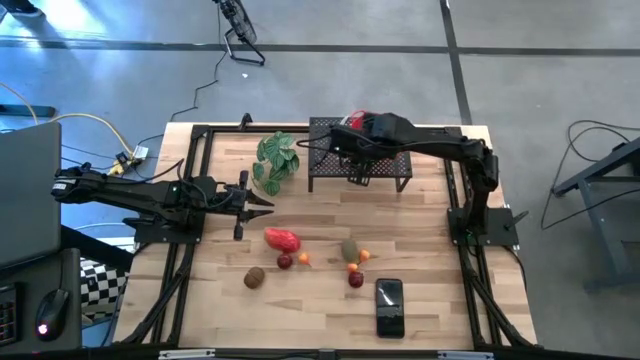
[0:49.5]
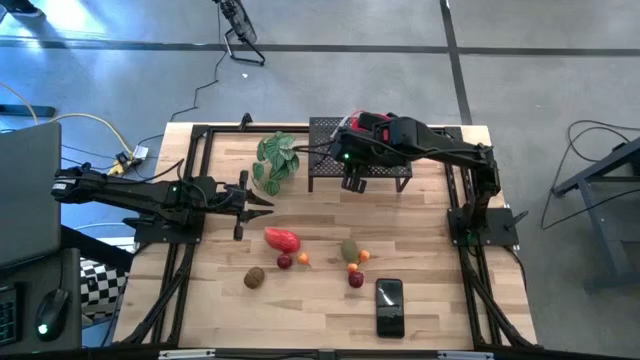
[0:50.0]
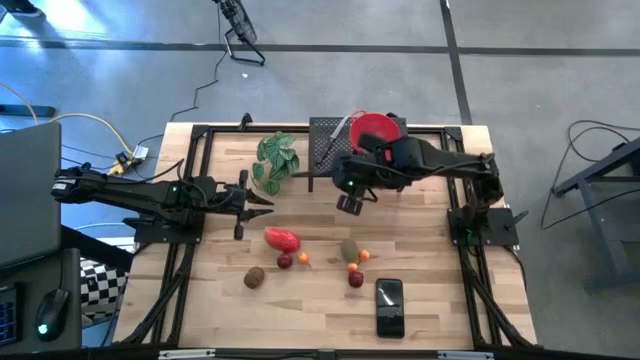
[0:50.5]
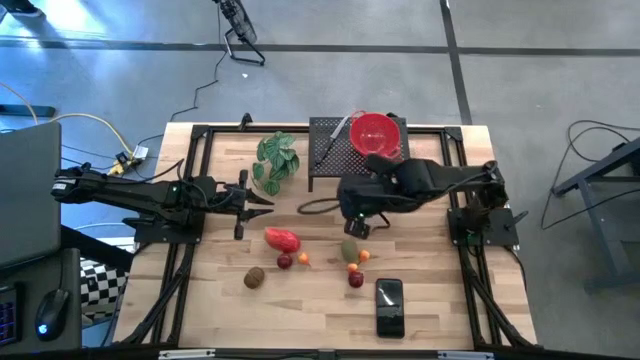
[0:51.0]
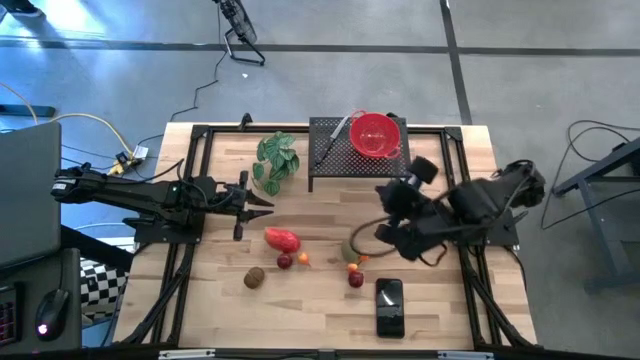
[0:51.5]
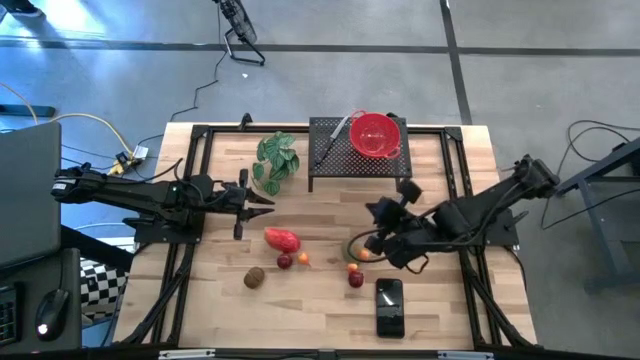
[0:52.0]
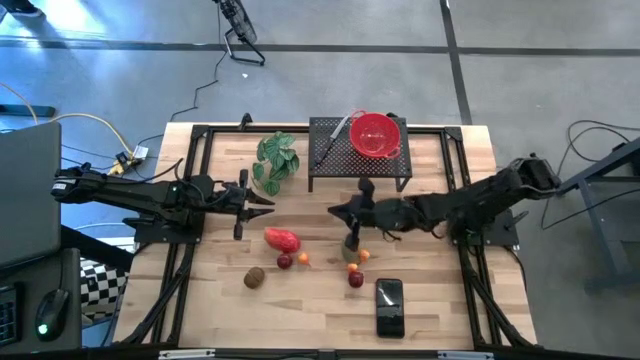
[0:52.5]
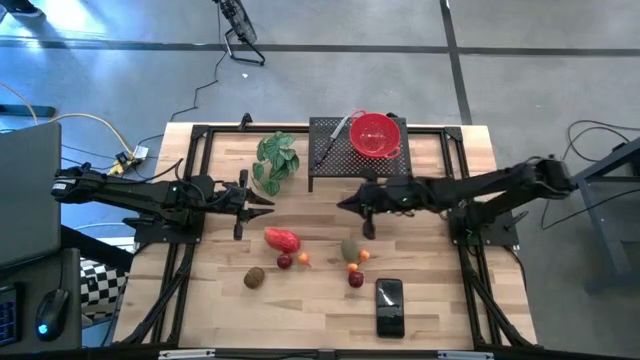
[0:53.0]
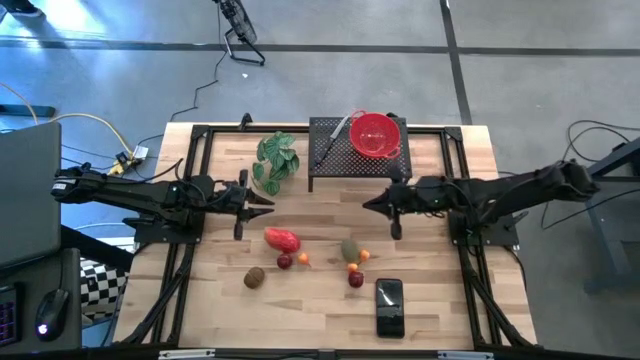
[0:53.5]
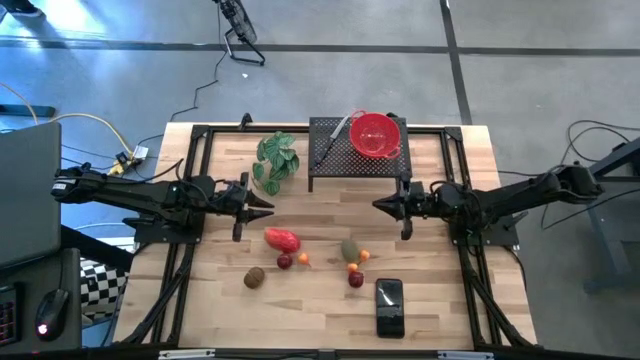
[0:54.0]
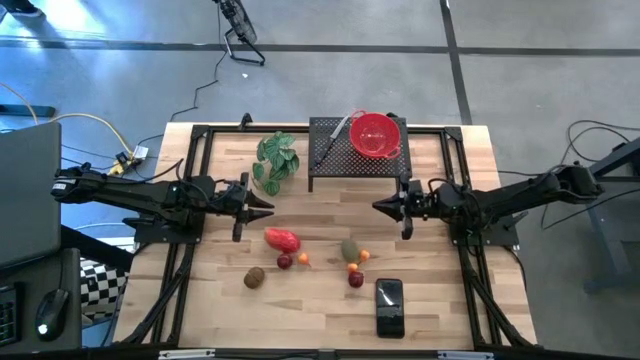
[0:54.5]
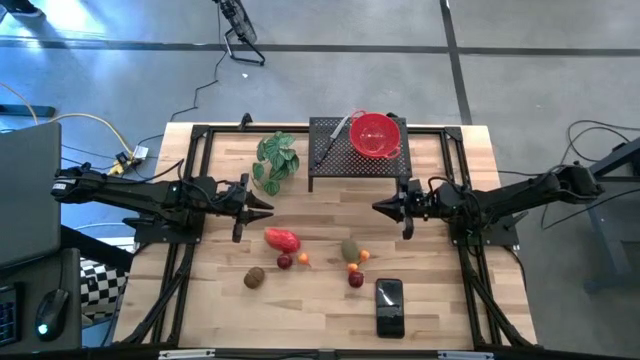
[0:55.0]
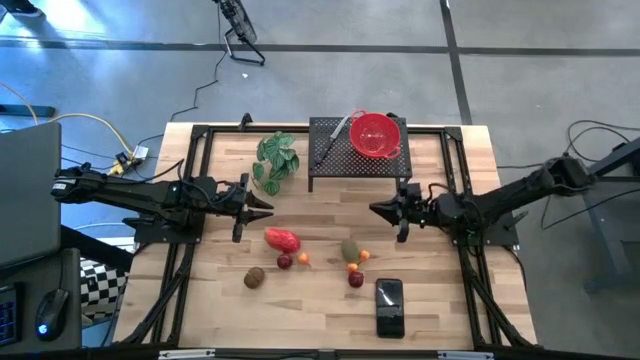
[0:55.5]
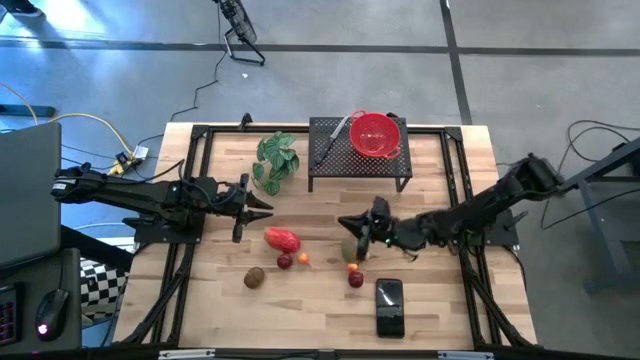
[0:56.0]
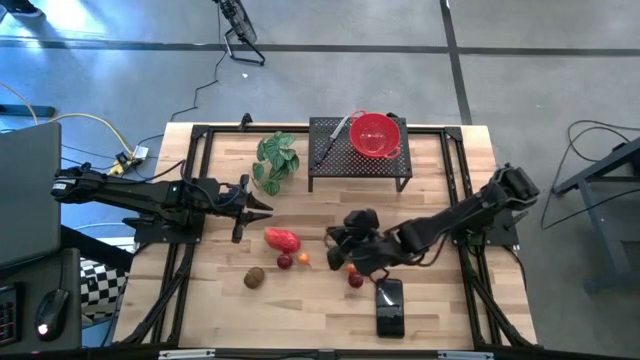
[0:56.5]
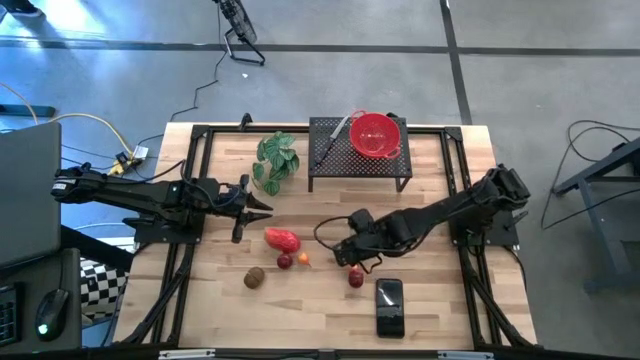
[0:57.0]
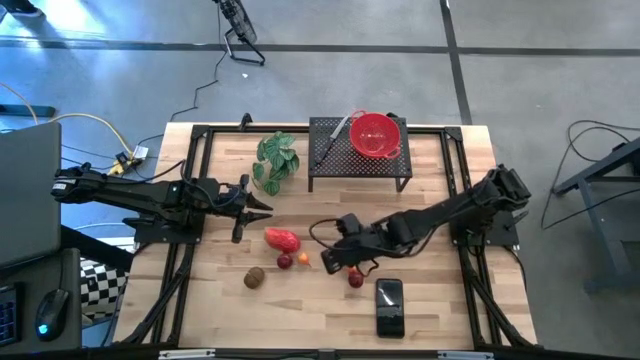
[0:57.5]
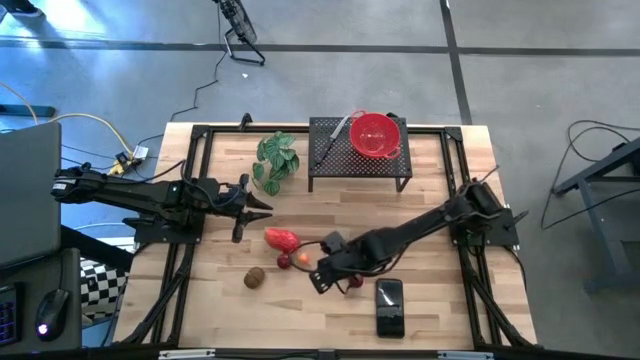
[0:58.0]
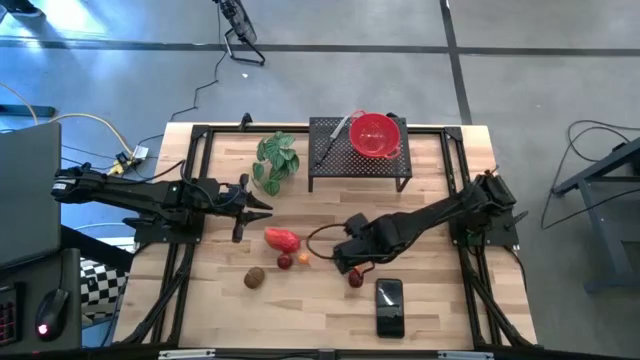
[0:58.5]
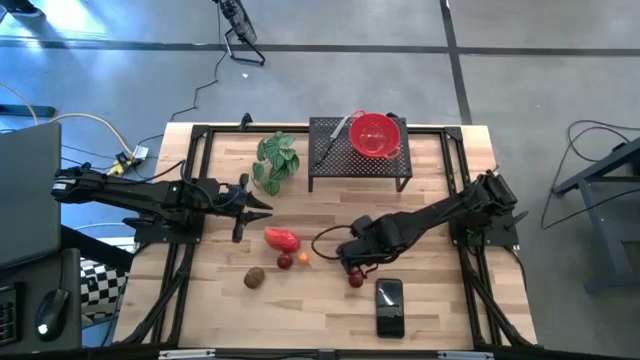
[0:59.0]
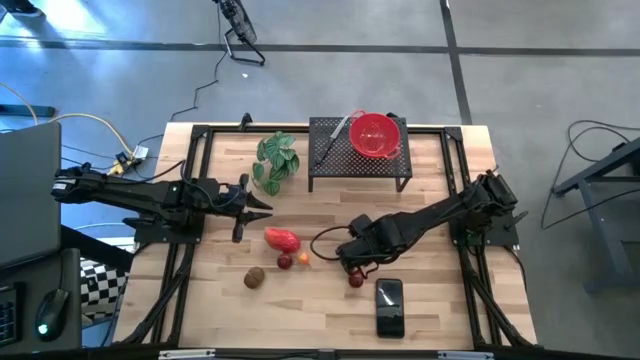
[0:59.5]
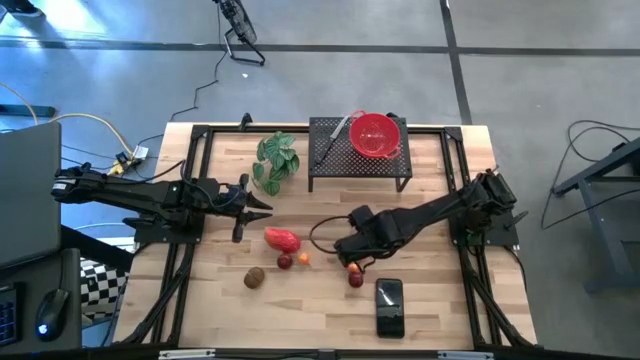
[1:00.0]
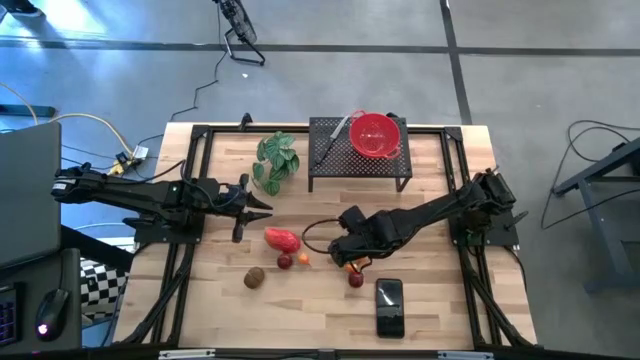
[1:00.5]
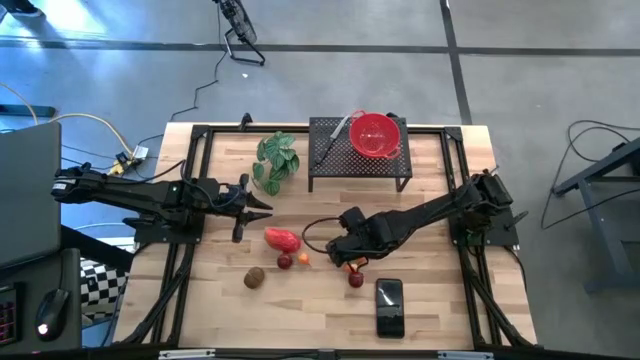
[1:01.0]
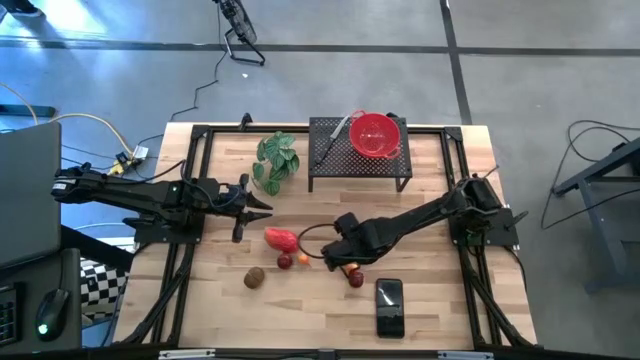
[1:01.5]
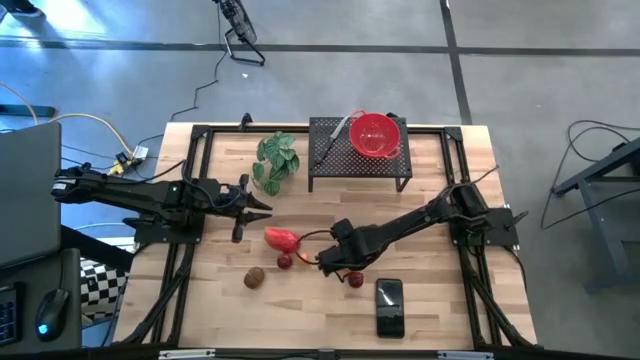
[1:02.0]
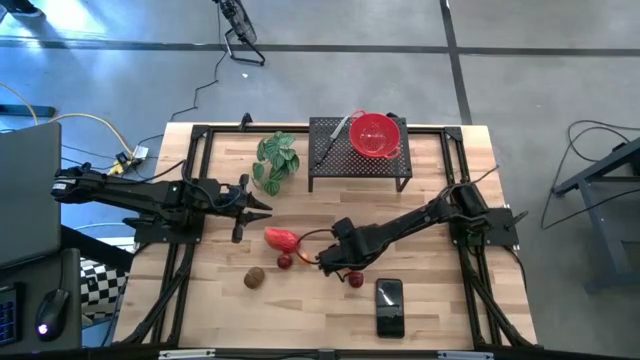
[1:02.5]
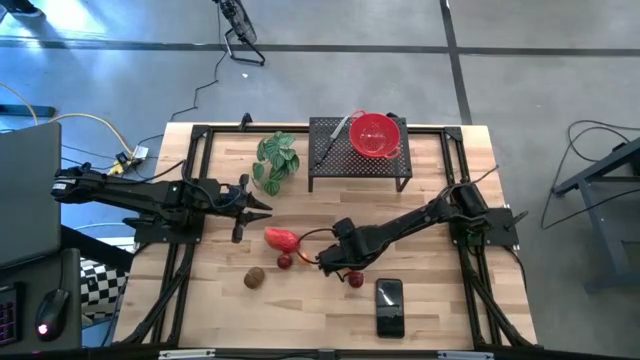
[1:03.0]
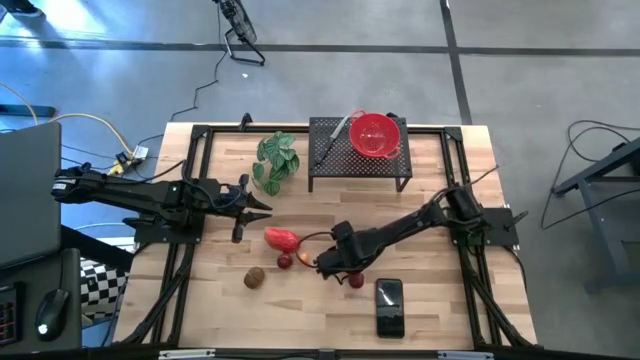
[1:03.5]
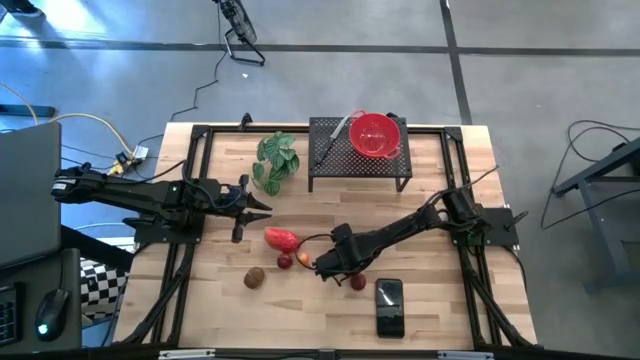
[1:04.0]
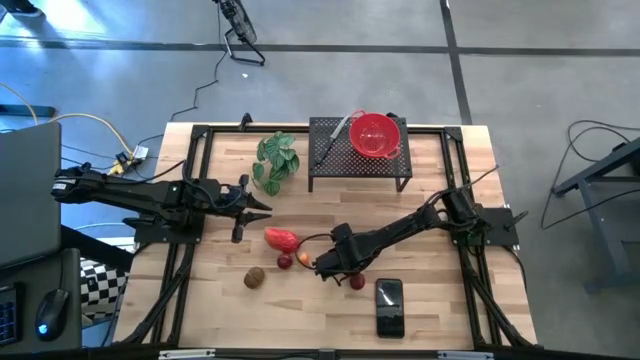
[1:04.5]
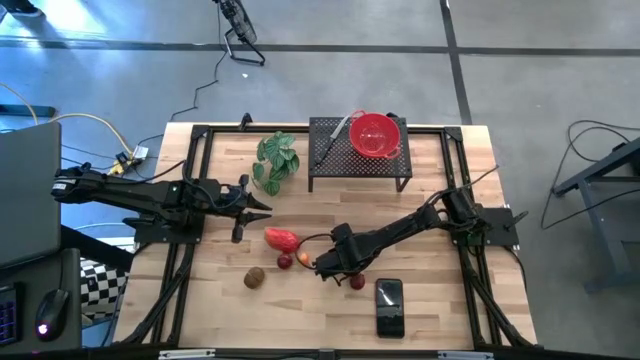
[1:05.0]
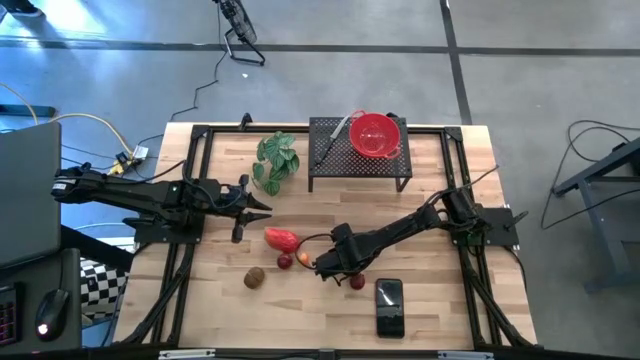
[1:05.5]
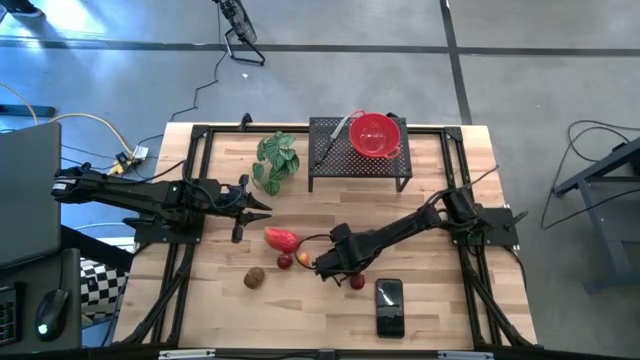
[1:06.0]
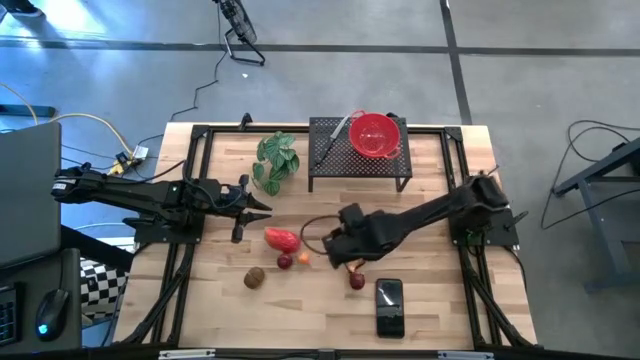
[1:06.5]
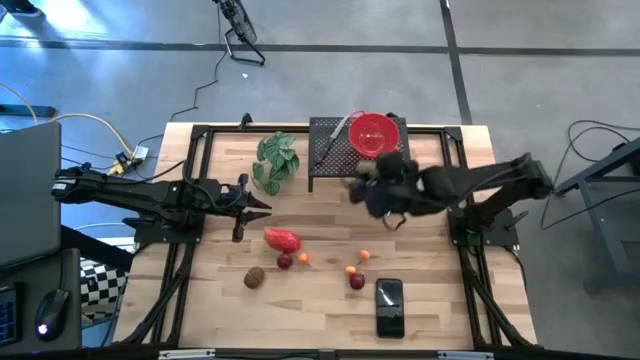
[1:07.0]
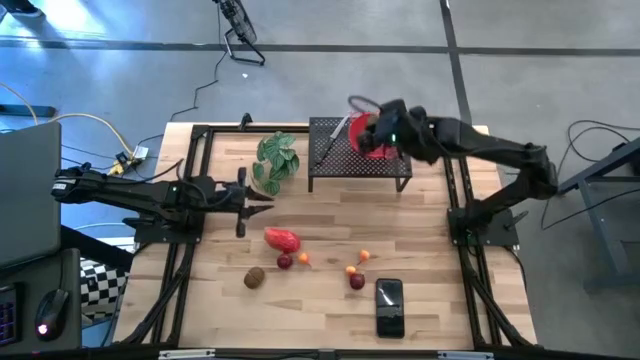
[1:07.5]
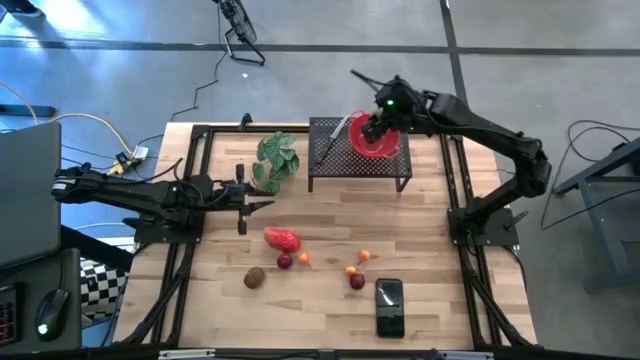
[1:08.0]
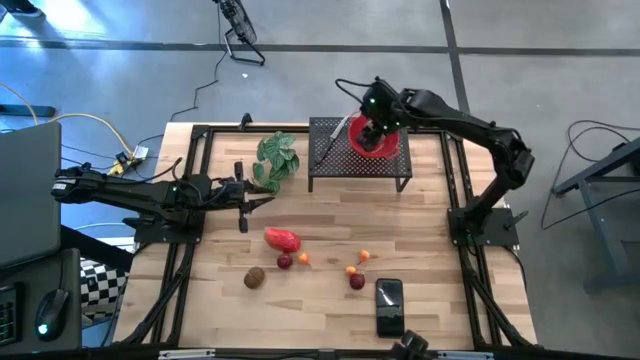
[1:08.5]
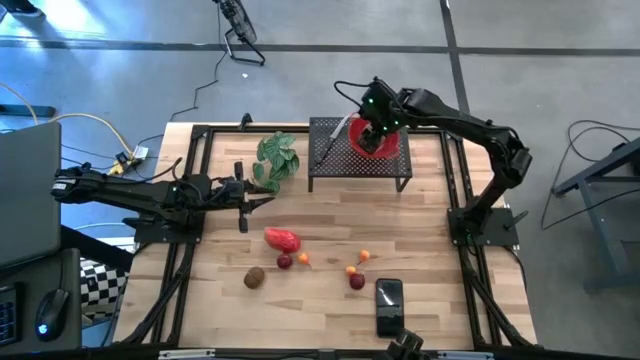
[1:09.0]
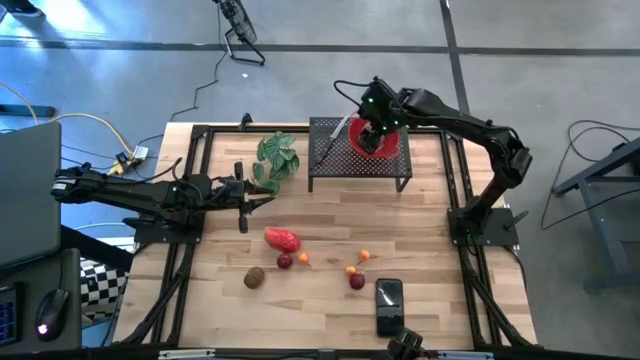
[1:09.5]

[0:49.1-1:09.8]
Task: Pick & Place Fruit
Put the right brown kiwi into the red strainer bowl on the shelf
